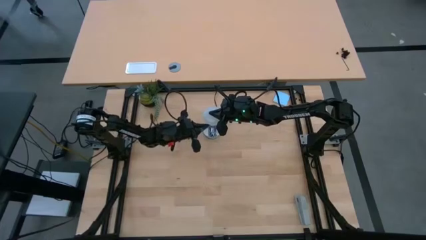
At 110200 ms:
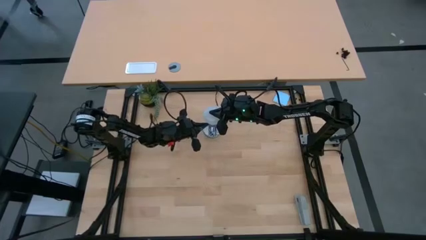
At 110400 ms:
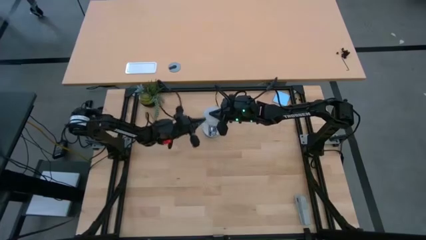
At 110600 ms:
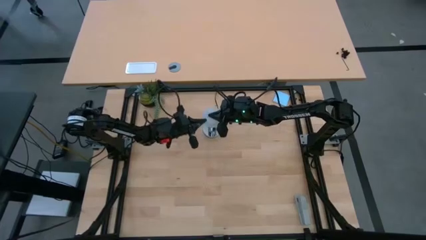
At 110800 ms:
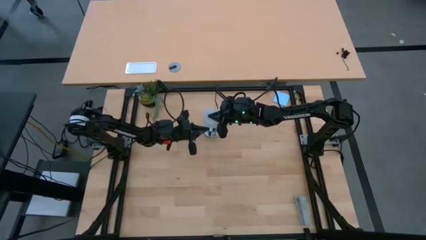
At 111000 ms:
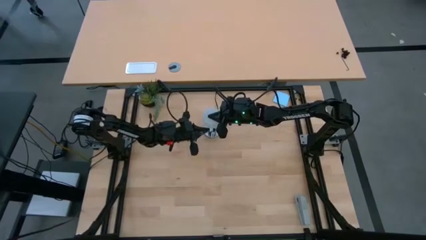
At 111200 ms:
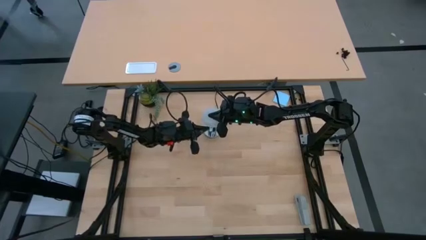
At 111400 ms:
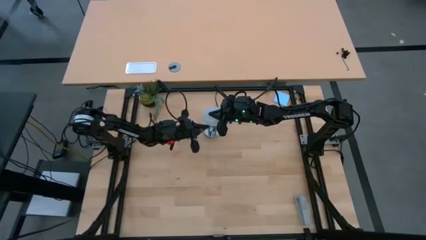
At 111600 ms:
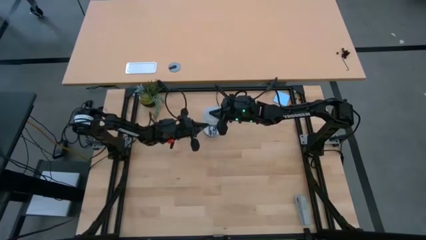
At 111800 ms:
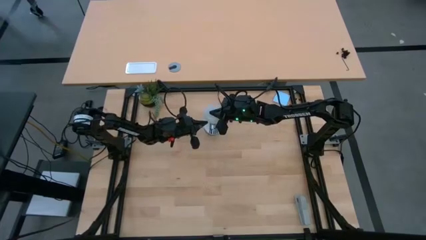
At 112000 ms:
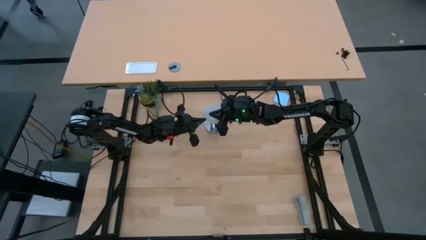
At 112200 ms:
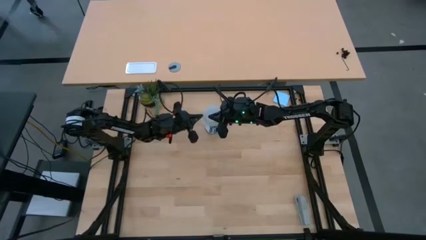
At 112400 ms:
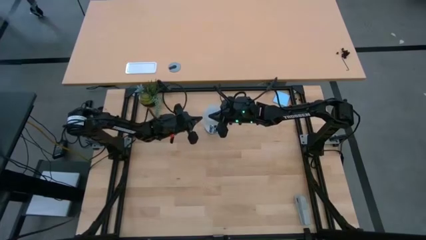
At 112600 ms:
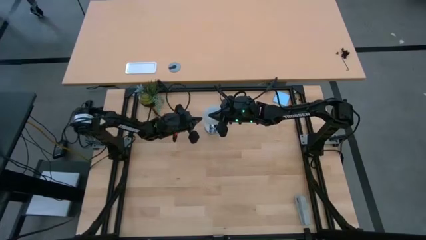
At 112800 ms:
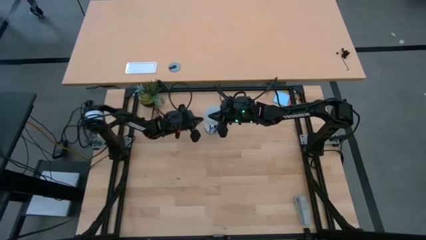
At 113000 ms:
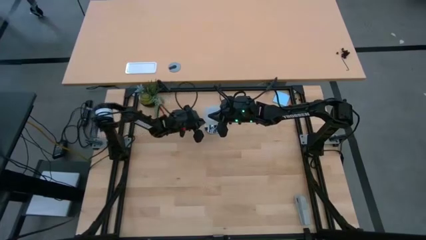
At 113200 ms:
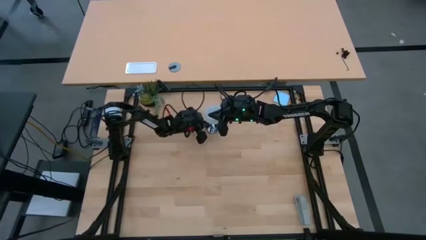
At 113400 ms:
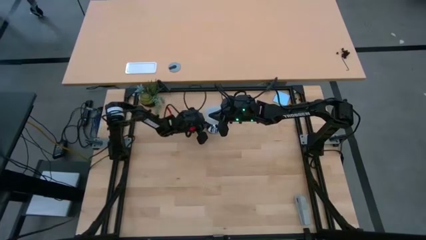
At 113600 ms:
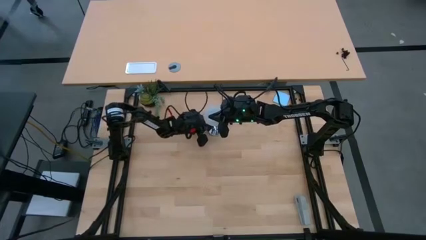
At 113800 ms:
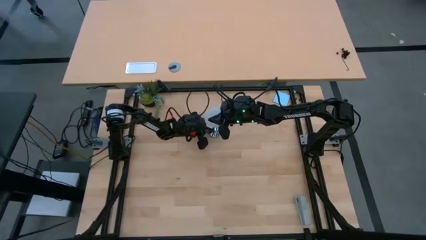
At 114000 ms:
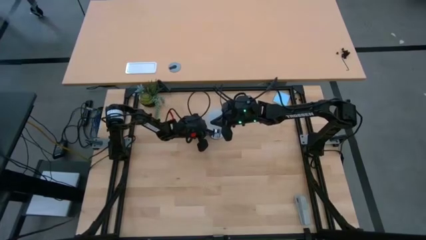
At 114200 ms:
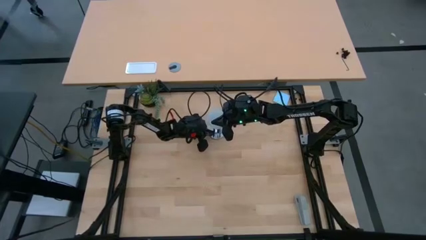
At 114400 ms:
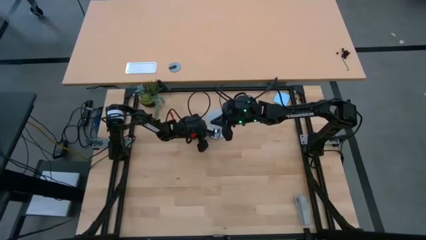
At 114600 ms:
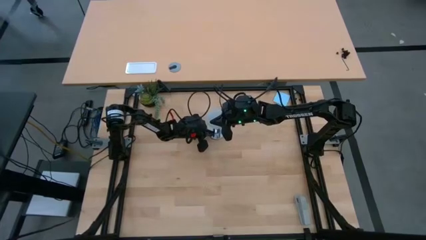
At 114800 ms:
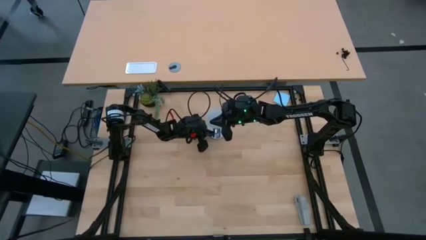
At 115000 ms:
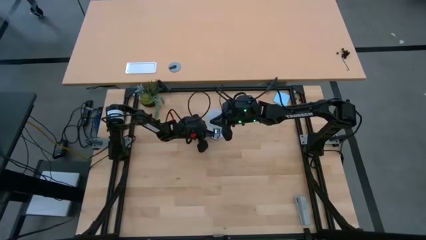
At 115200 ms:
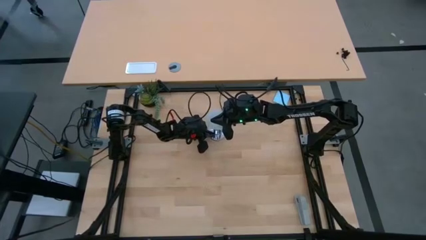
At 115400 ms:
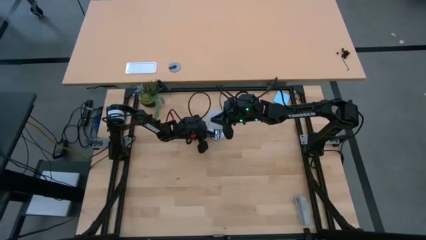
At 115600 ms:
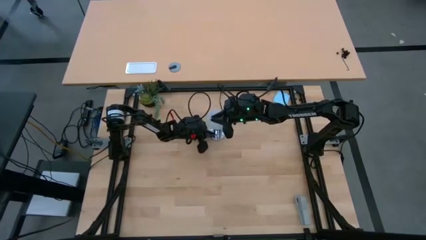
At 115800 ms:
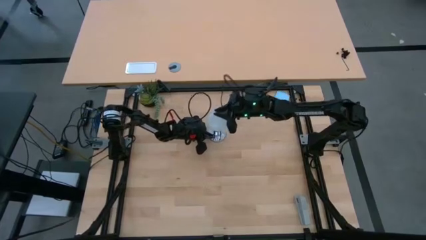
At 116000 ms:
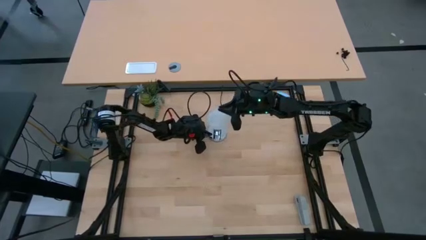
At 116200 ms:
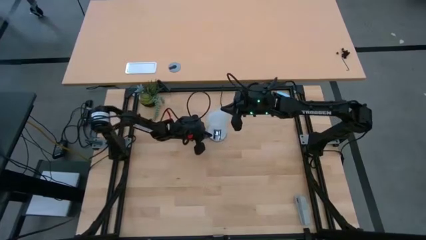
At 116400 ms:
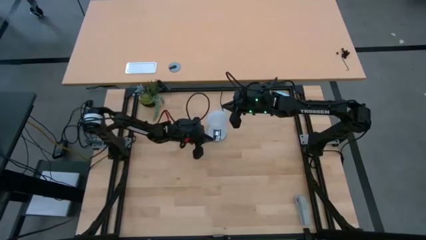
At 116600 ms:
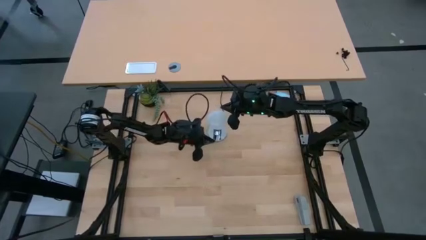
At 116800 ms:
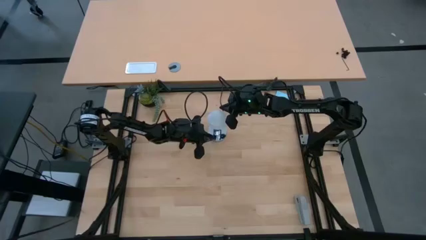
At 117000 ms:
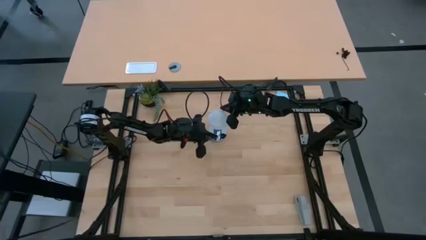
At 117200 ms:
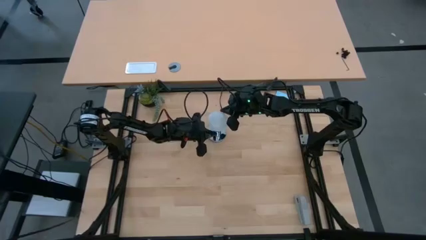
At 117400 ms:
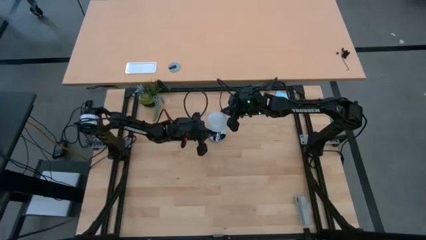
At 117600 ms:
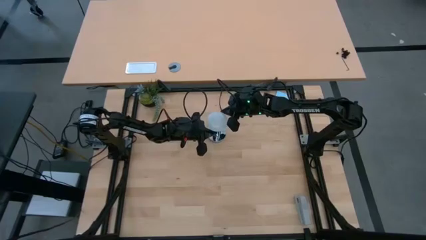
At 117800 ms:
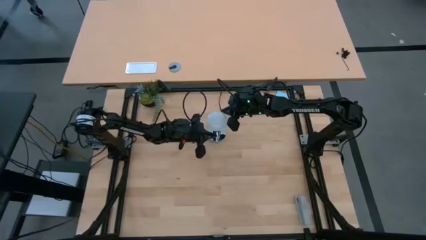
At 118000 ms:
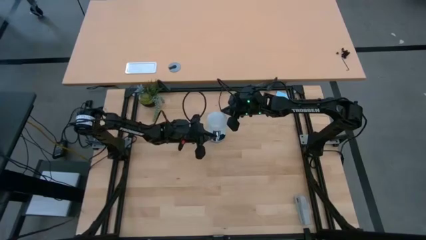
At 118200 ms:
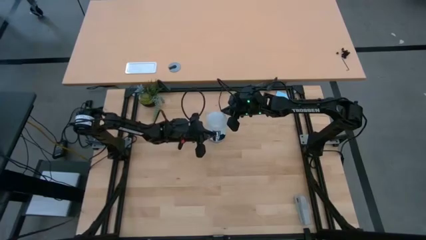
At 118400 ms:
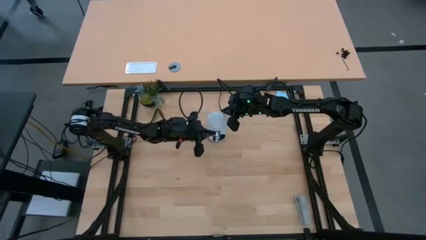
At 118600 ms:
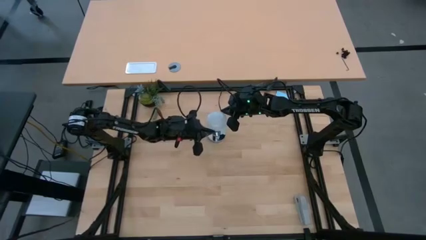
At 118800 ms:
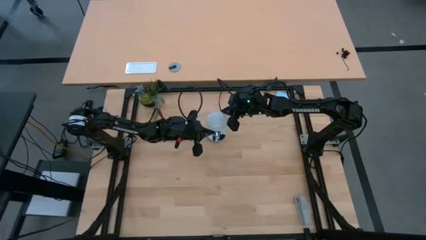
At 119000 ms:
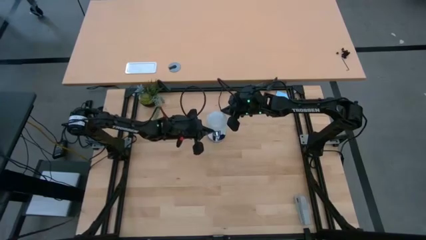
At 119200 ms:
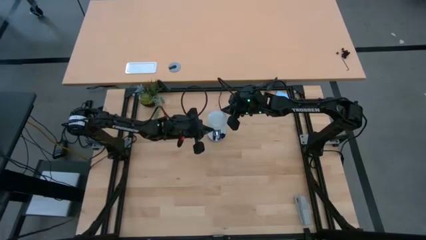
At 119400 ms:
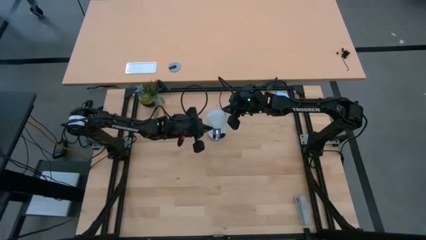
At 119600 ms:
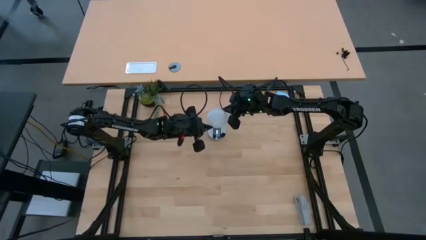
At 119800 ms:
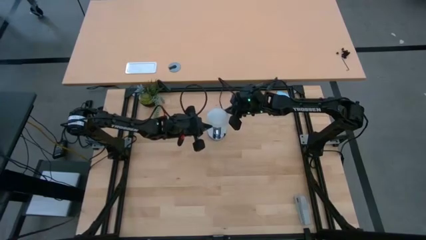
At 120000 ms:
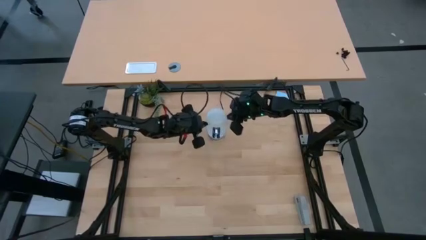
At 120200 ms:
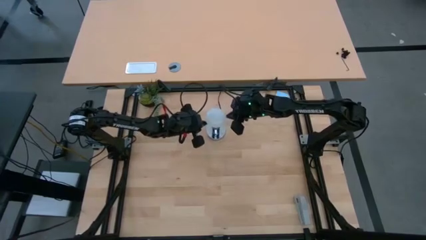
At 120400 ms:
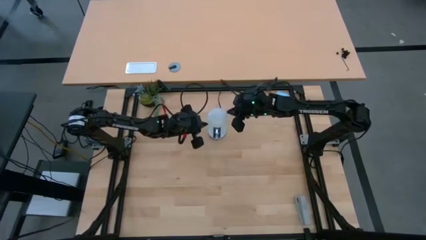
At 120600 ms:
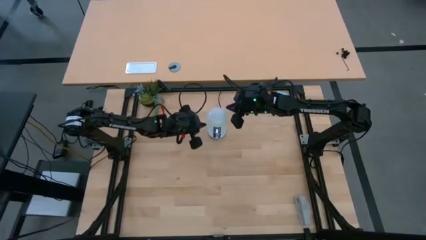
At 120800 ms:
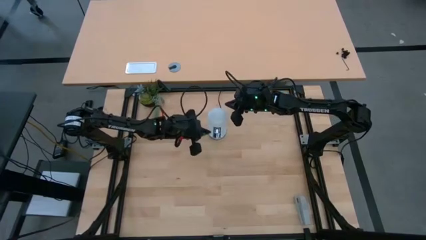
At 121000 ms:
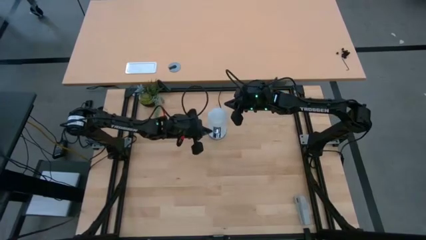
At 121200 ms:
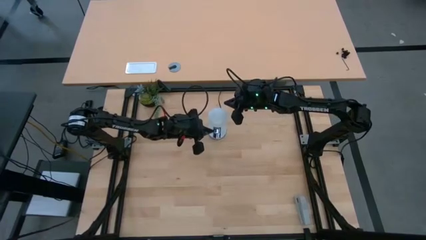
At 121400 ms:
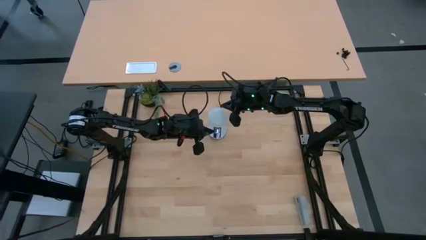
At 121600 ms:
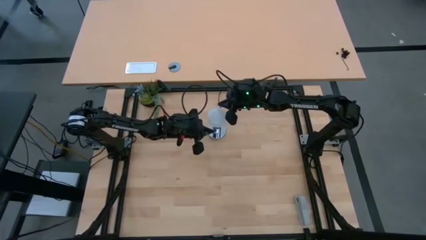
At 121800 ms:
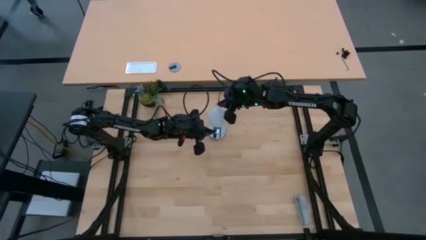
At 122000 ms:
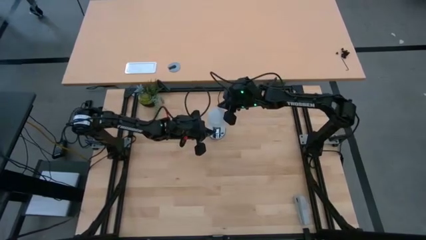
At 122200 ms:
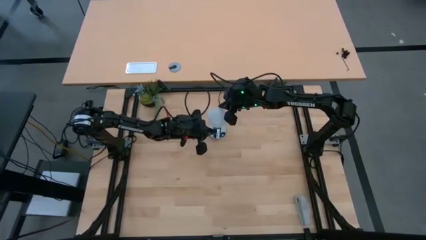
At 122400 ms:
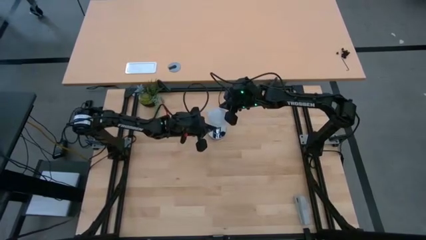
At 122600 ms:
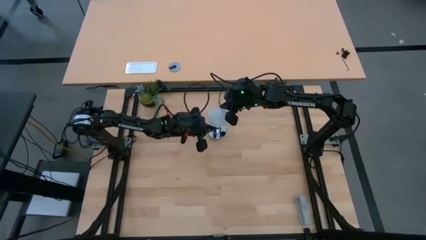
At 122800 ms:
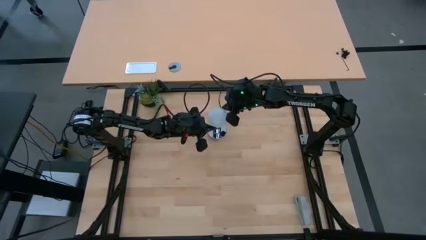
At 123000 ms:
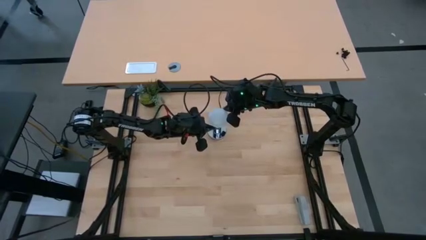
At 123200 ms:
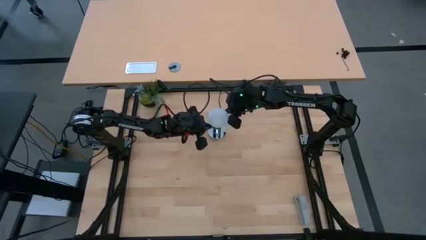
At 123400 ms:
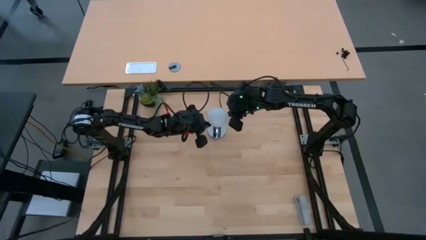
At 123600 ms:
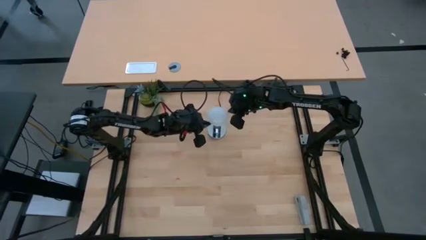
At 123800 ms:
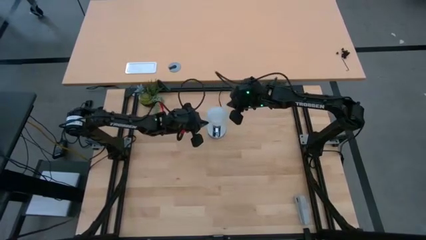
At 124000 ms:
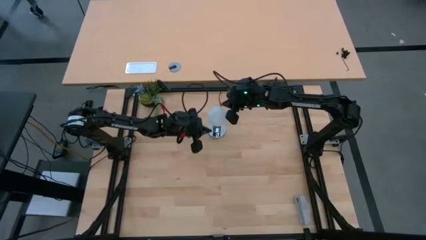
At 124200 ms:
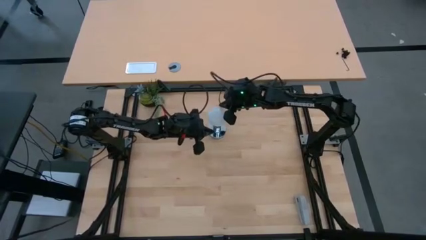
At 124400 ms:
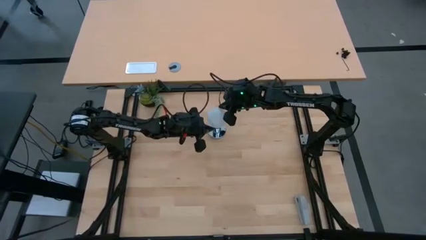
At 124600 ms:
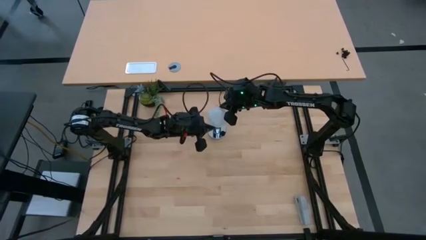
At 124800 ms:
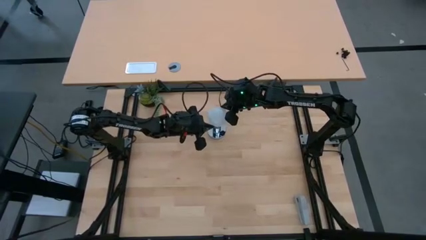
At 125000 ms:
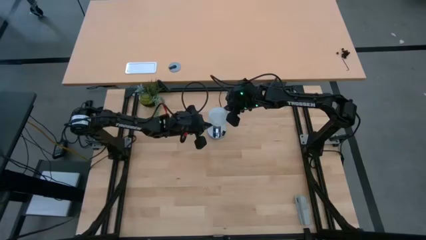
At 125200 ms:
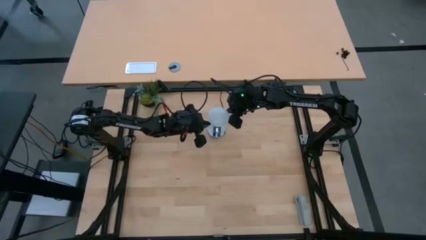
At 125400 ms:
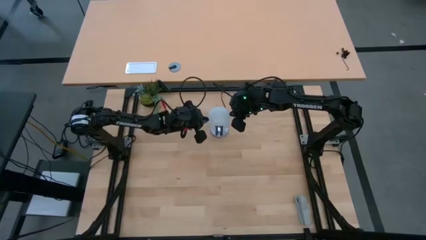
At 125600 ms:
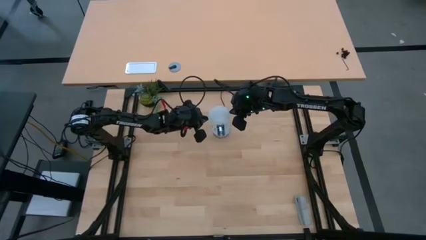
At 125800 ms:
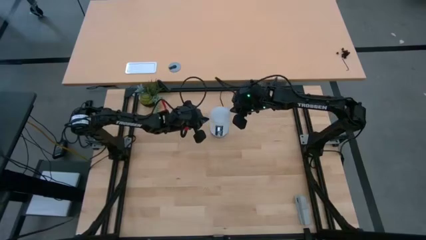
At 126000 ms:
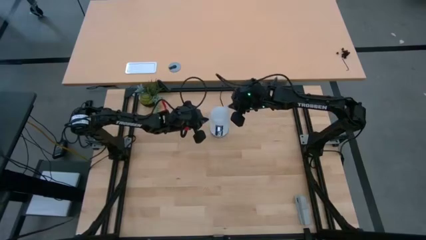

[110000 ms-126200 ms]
Task: Screw lightbulb
Insert the white lightbulb into the desk lamp
